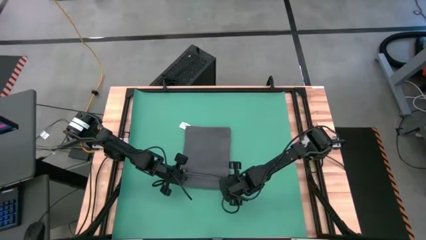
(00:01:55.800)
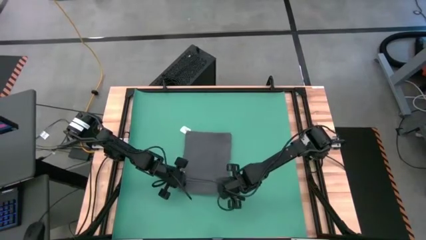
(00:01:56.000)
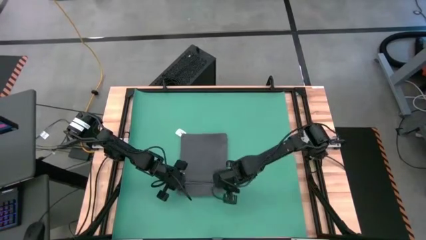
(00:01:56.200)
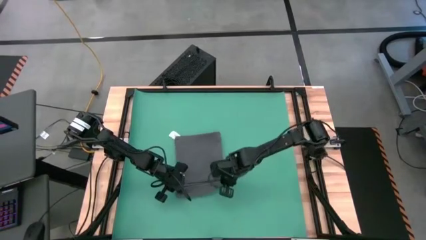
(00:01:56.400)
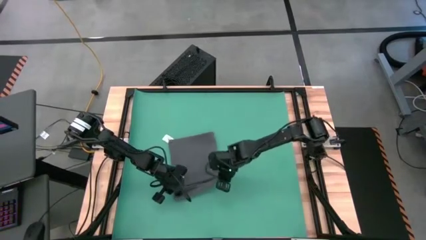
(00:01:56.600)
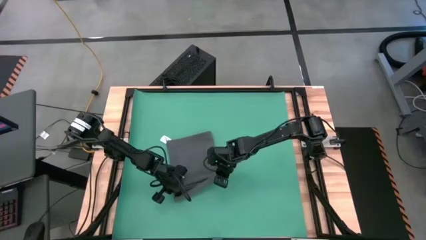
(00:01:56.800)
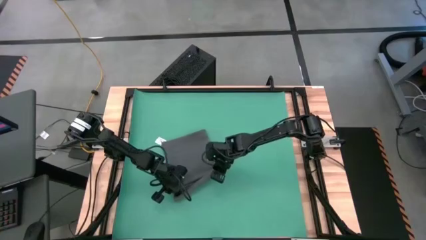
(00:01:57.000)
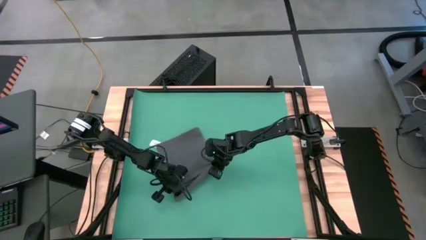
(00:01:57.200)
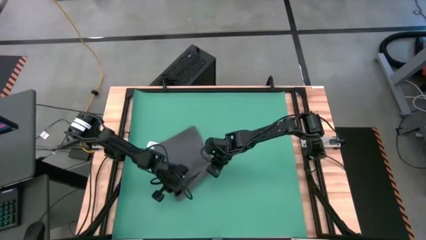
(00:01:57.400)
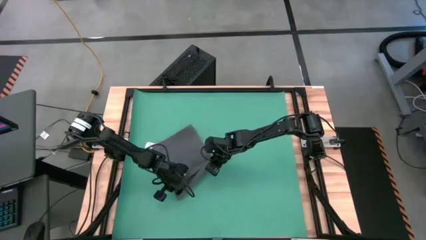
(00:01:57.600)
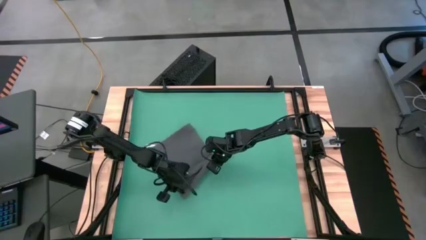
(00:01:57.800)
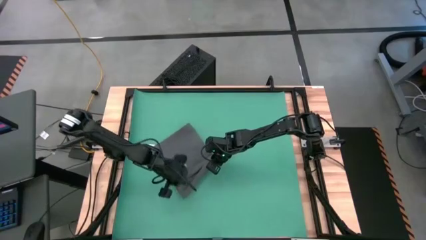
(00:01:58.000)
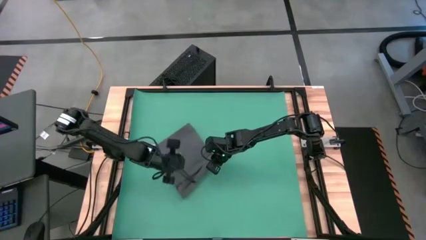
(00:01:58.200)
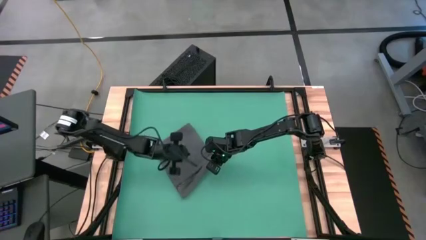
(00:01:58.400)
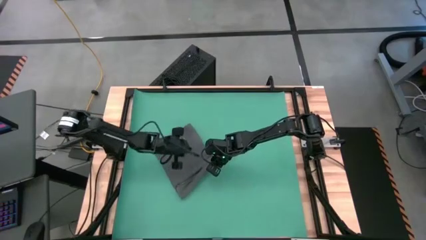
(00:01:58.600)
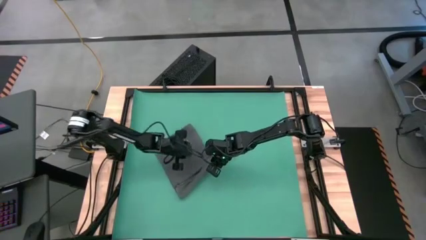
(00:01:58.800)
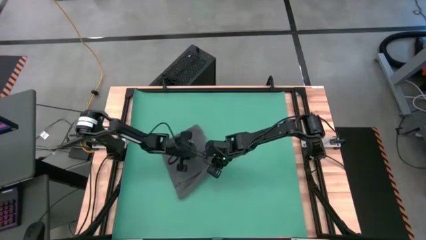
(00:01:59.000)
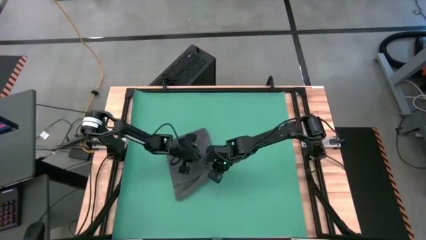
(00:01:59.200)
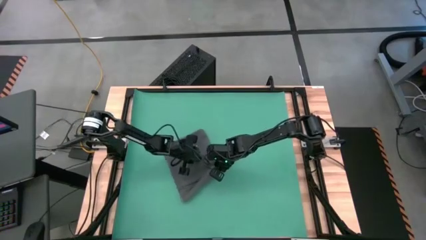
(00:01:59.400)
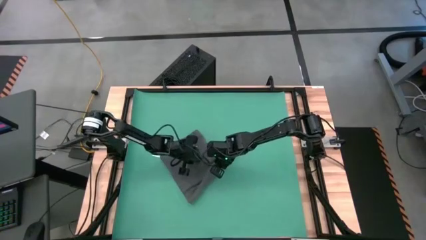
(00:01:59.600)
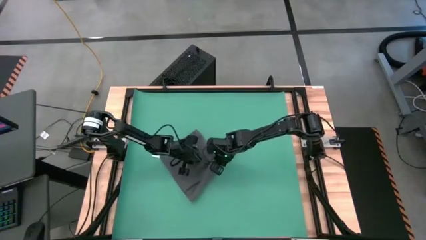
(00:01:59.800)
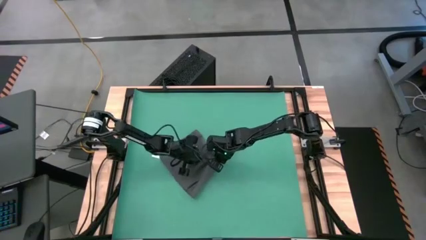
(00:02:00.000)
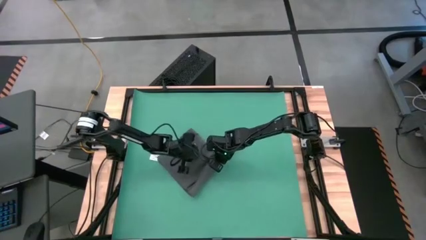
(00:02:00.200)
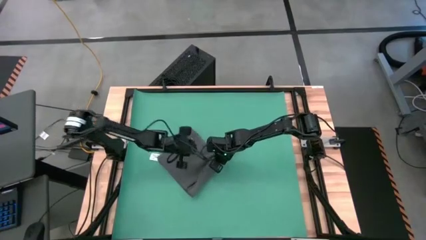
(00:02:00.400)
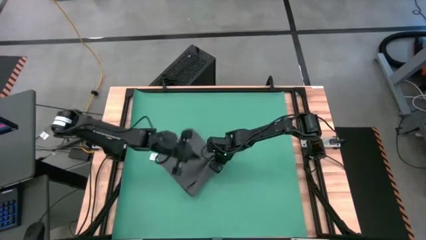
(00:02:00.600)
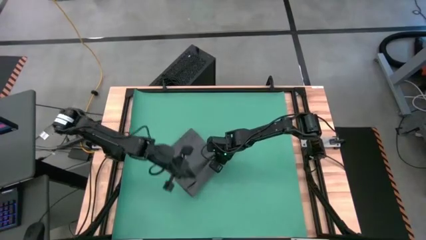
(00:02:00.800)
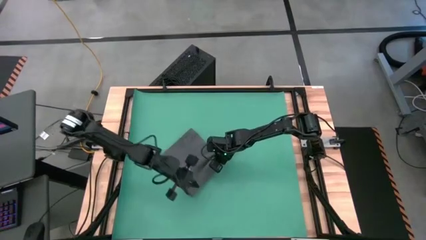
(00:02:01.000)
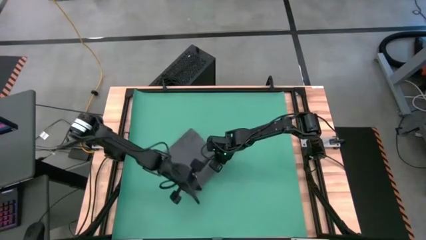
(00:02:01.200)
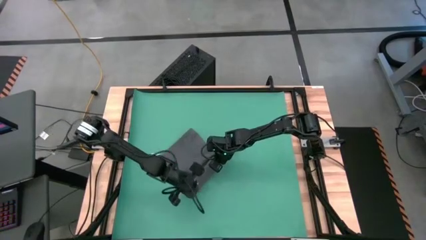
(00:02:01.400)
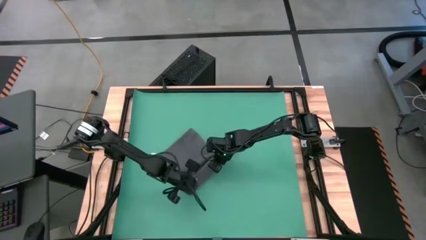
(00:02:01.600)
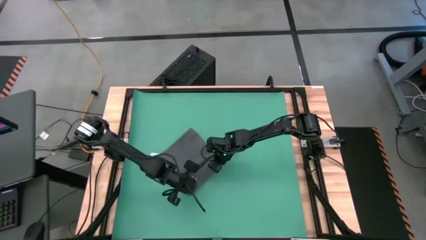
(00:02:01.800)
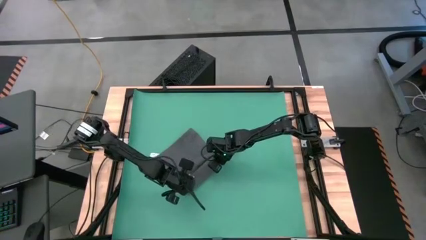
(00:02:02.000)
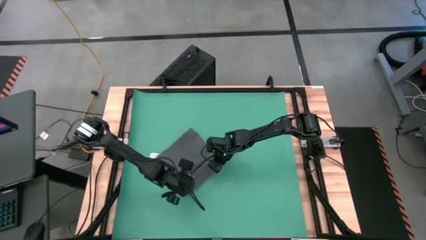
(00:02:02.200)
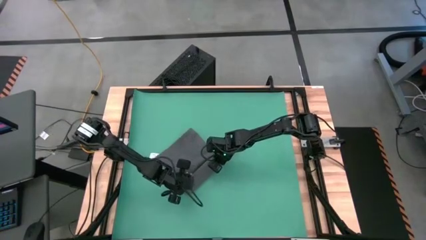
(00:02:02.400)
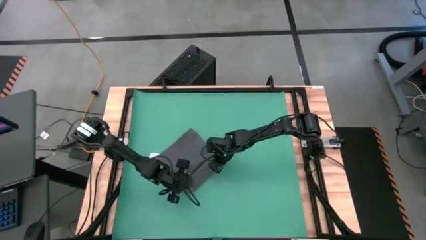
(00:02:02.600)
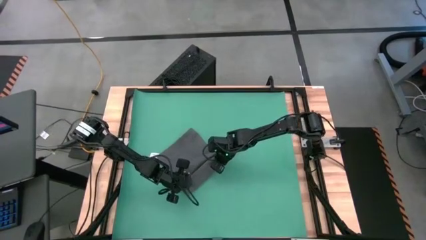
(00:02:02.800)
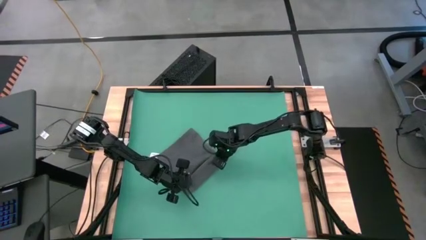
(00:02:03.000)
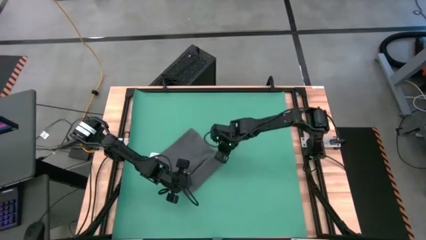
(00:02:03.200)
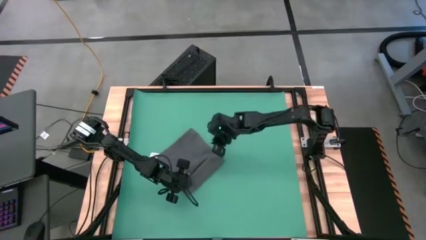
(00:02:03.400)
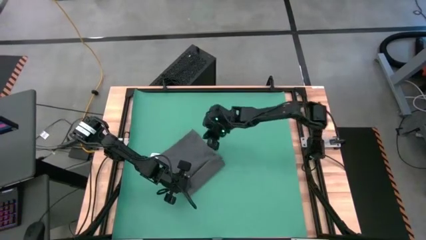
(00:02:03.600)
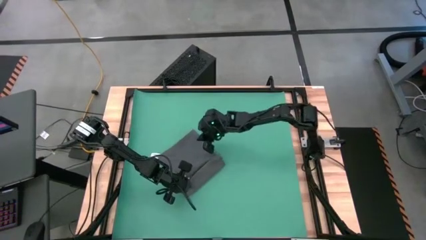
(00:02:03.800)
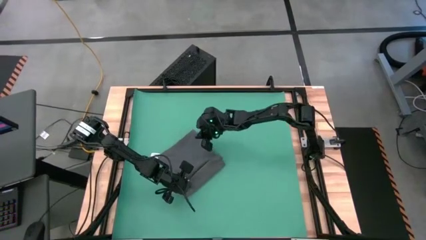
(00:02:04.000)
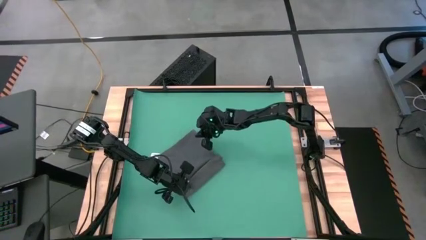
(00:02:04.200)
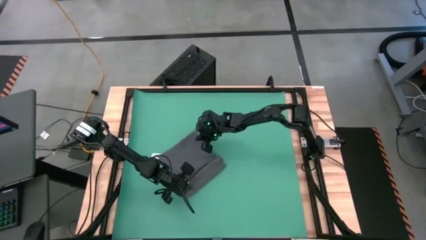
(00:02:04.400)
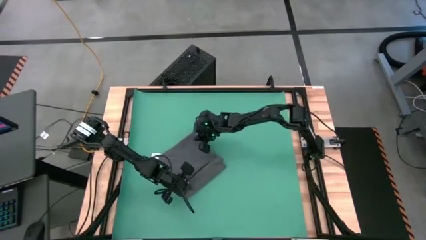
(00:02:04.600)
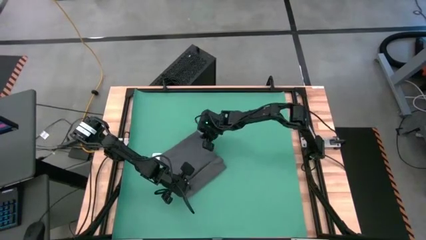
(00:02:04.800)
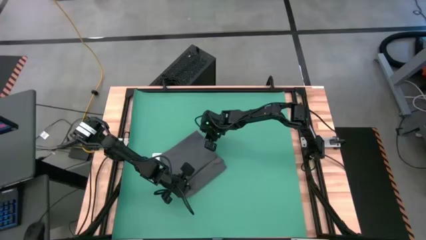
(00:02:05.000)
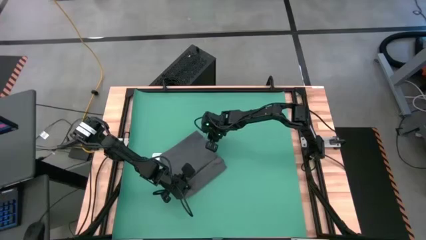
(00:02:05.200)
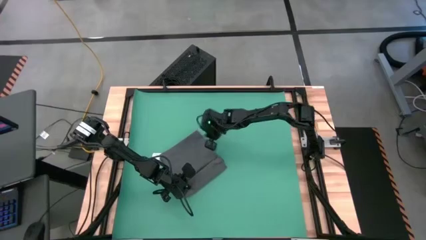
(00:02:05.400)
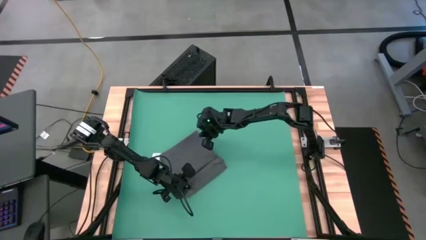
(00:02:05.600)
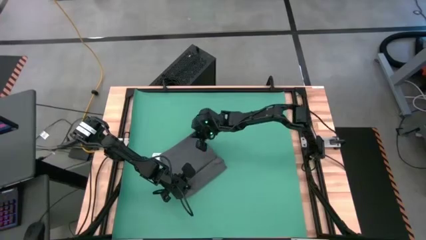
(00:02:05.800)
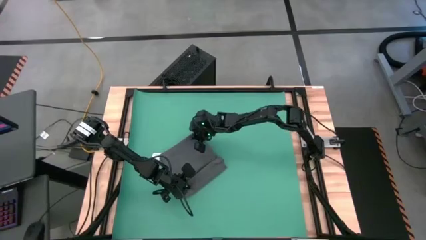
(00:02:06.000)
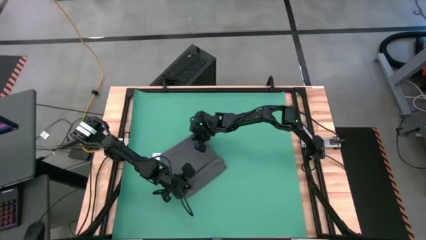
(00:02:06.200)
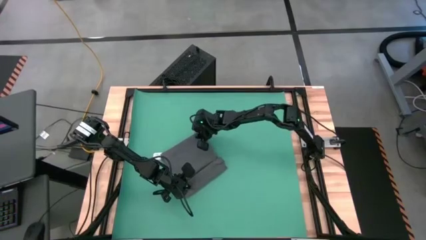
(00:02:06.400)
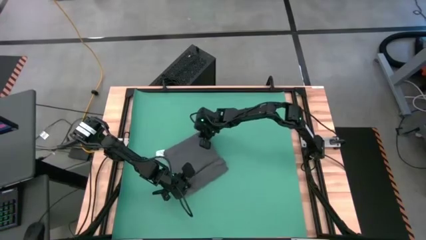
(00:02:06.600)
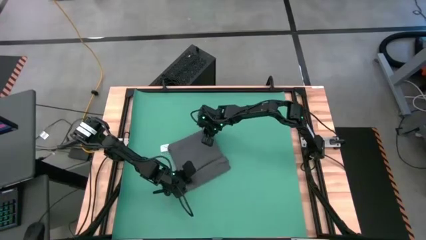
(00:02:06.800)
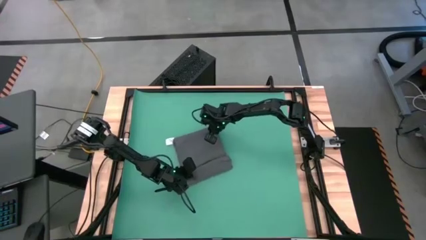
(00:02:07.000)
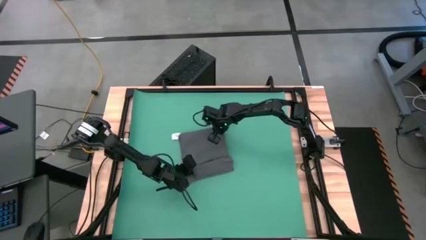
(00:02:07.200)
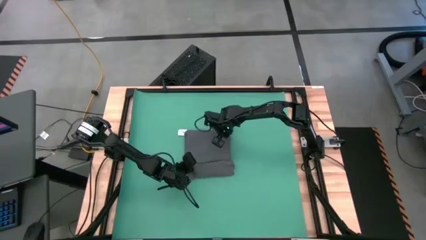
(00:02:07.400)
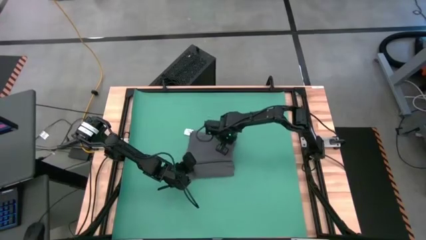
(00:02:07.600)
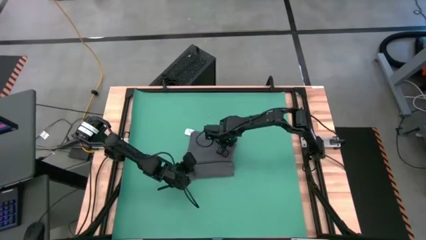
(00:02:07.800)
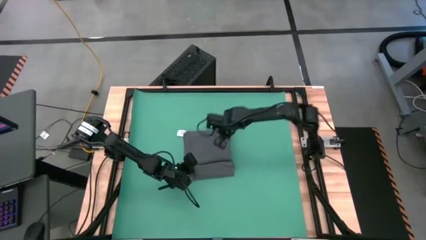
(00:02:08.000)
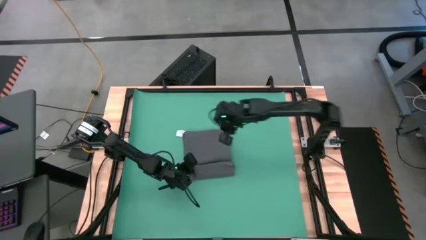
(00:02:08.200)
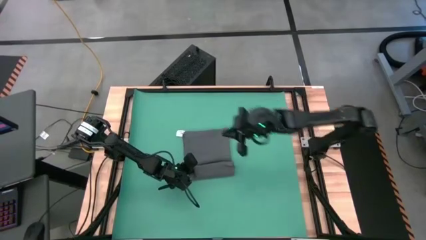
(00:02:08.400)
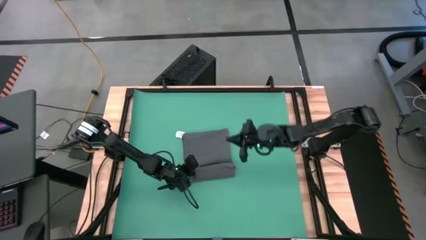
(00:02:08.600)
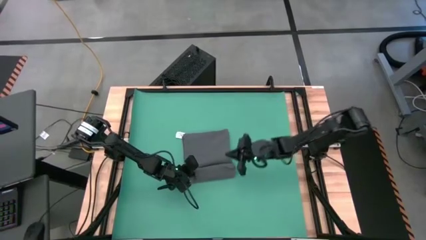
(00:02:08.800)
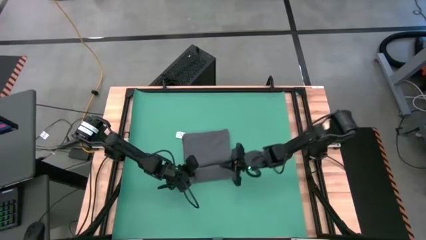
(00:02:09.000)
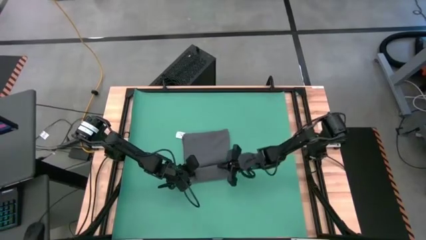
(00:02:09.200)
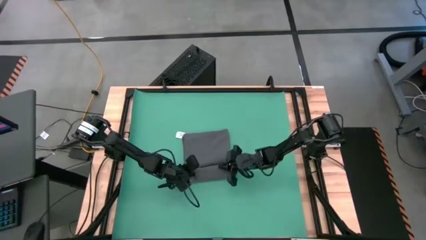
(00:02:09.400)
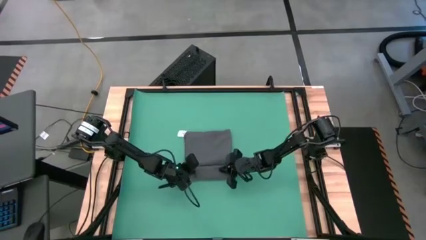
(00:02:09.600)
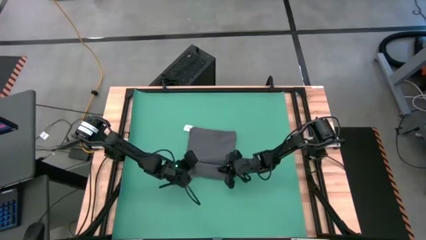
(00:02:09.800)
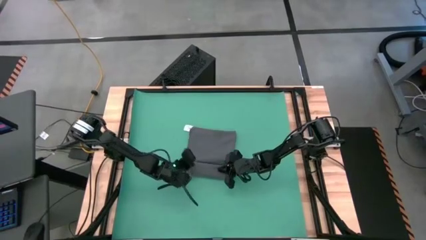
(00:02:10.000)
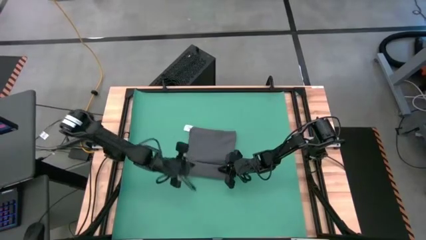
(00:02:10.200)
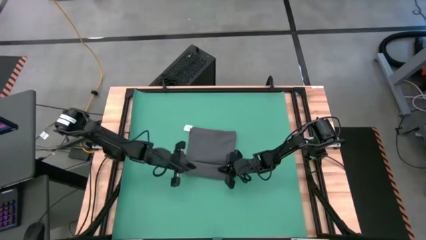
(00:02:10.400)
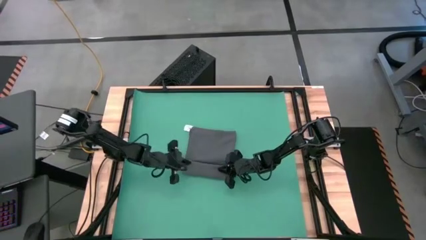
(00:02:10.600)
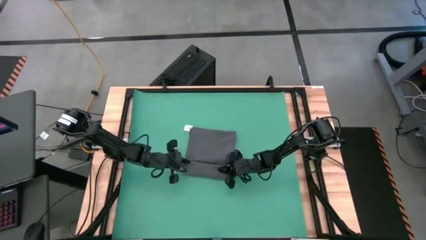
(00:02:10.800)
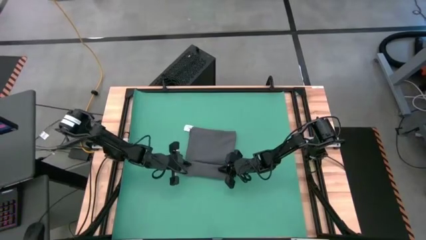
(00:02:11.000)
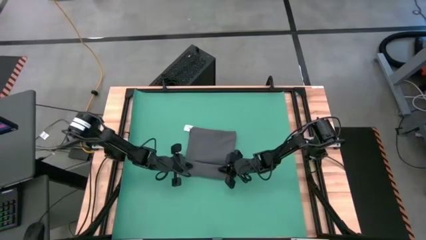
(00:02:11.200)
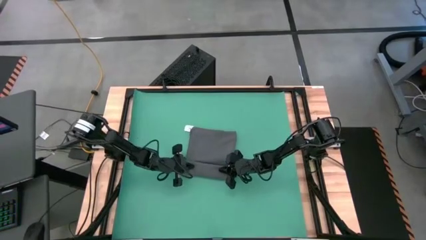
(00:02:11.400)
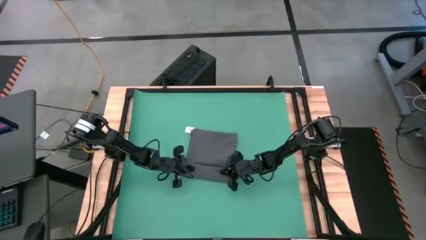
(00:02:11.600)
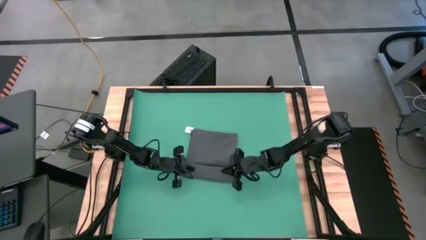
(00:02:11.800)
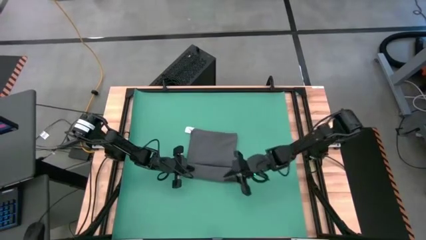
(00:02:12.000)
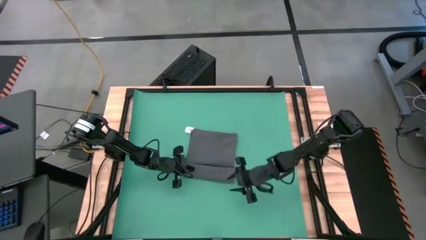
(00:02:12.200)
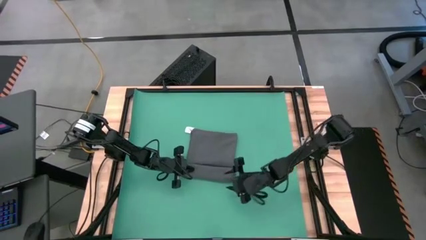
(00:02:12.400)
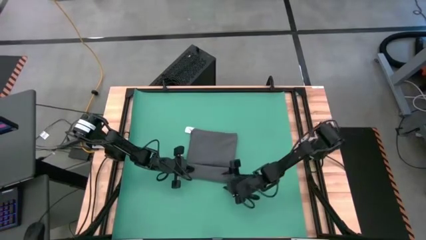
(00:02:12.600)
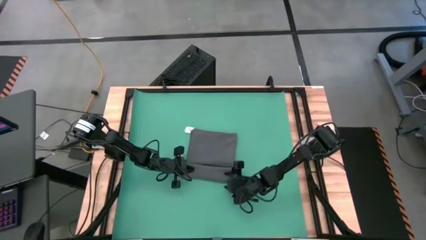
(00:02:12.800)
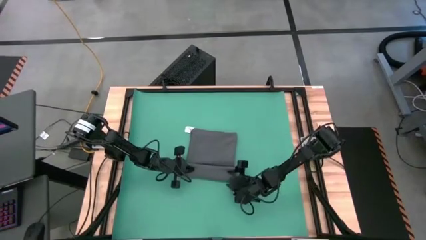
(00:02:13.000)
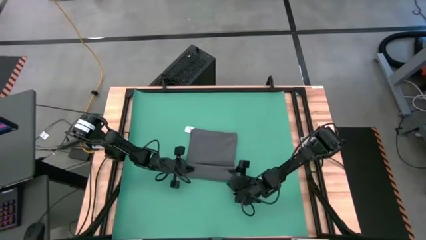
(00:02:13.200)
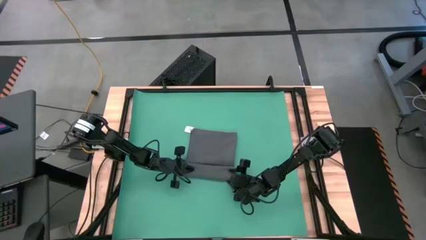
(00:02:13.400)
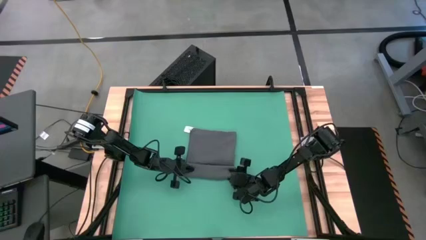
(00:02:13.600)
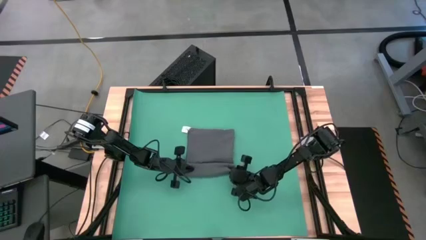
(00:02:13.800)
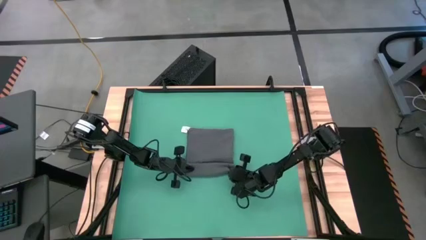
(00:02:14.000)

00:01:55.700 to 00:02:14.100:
Task: Roll towel
Roll the gray towel
